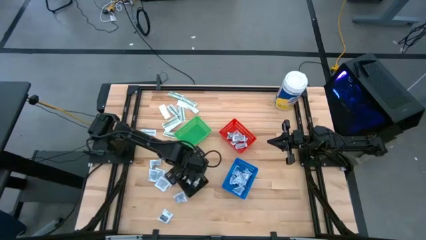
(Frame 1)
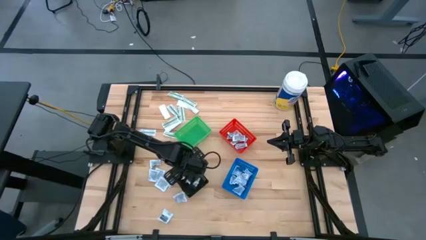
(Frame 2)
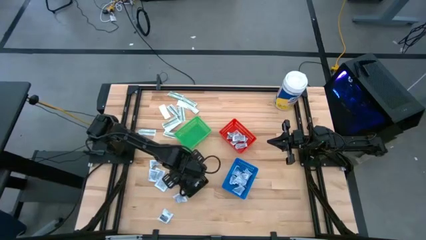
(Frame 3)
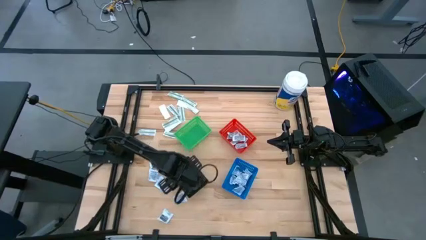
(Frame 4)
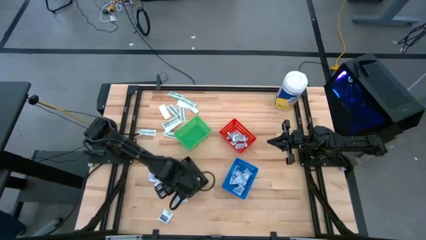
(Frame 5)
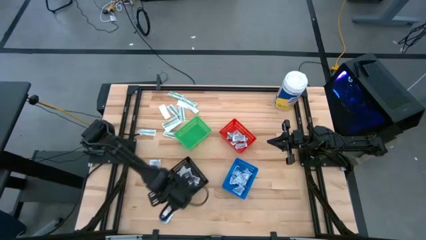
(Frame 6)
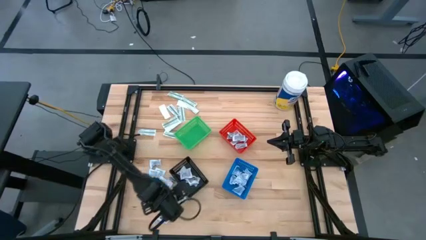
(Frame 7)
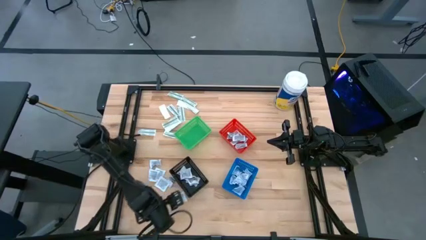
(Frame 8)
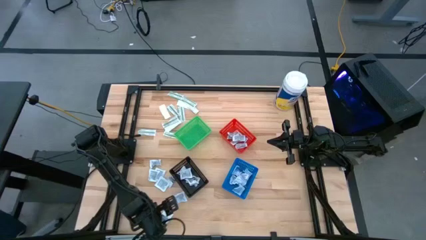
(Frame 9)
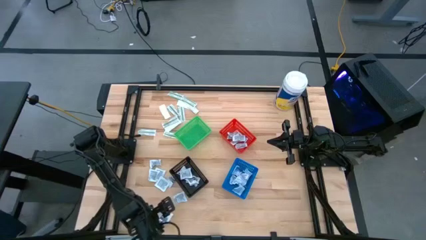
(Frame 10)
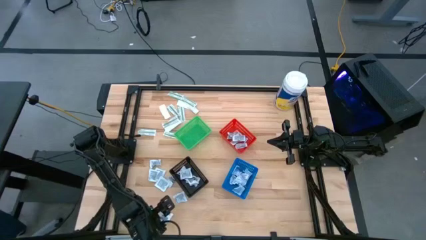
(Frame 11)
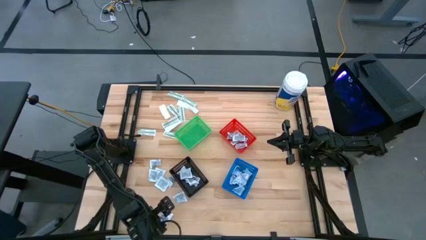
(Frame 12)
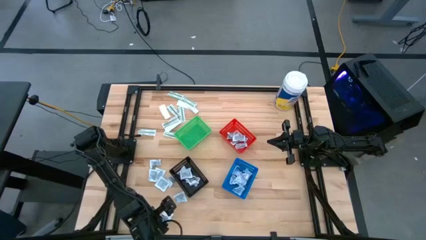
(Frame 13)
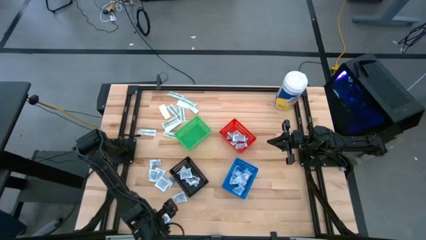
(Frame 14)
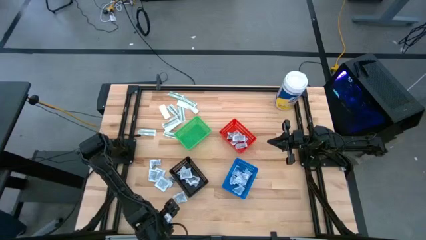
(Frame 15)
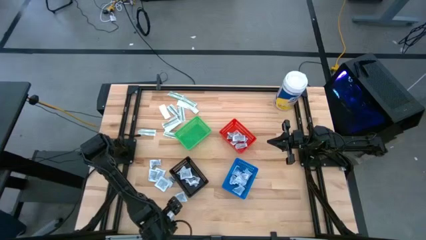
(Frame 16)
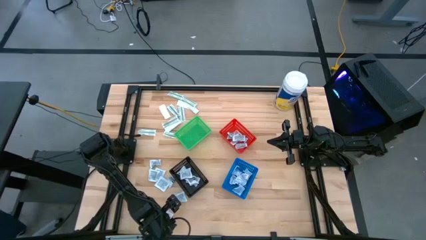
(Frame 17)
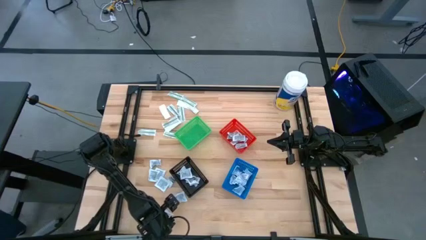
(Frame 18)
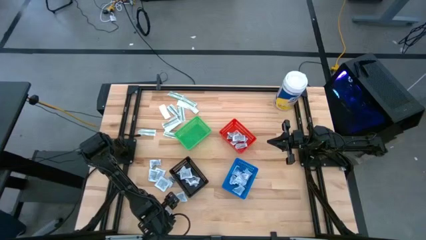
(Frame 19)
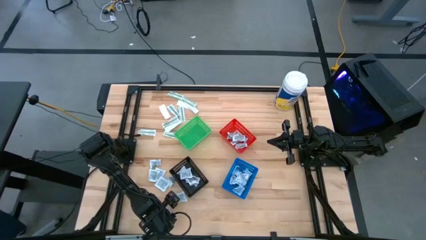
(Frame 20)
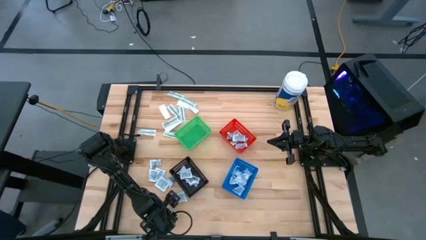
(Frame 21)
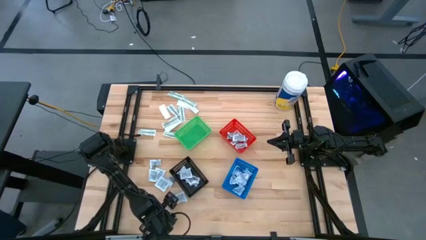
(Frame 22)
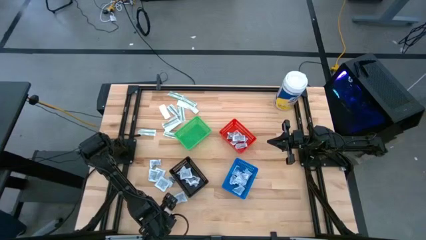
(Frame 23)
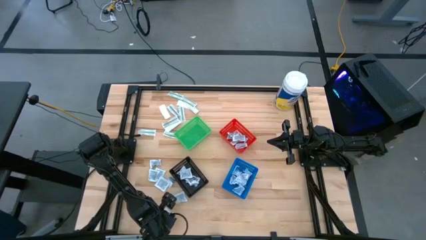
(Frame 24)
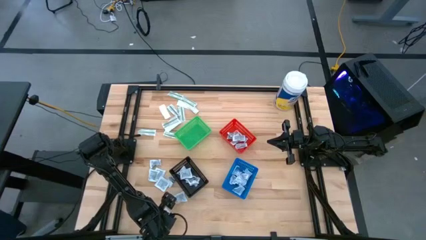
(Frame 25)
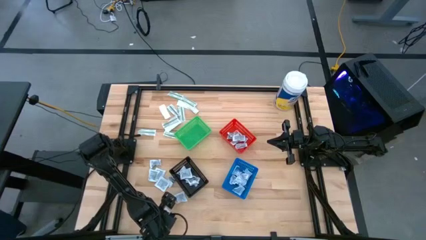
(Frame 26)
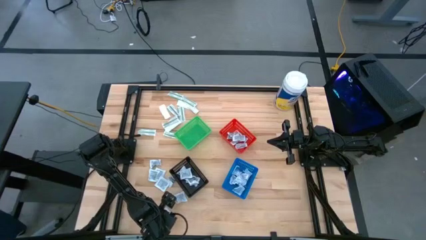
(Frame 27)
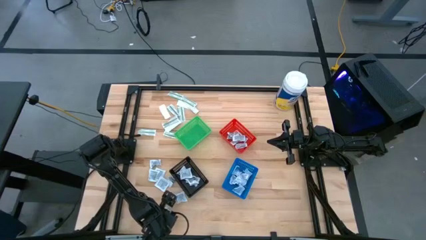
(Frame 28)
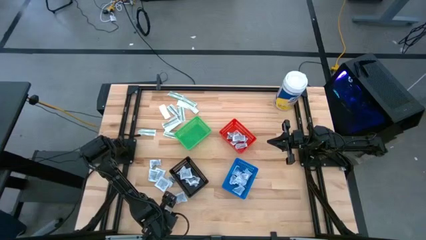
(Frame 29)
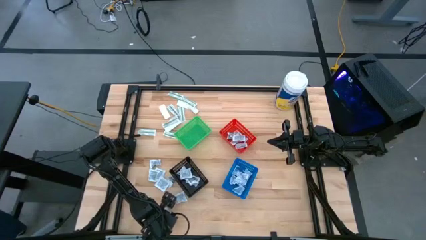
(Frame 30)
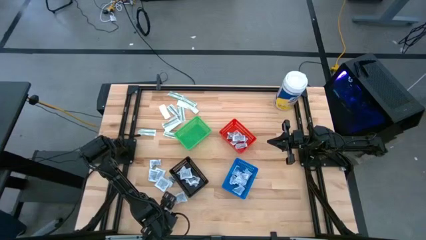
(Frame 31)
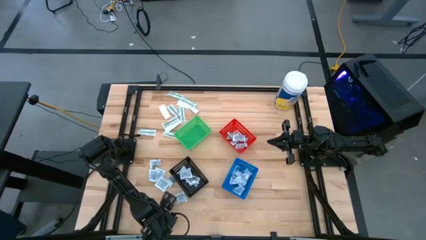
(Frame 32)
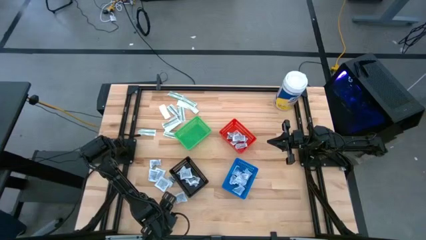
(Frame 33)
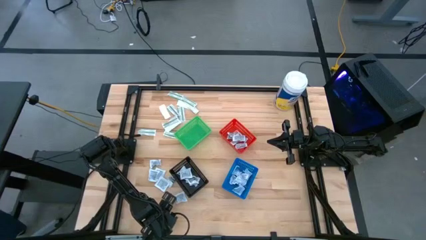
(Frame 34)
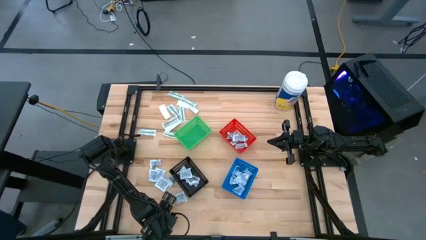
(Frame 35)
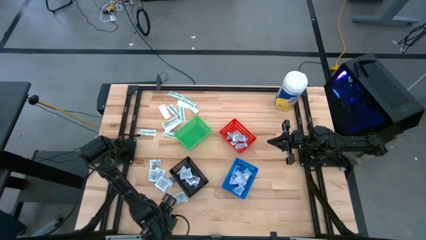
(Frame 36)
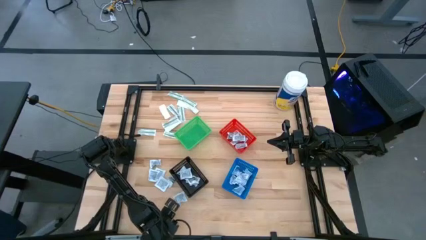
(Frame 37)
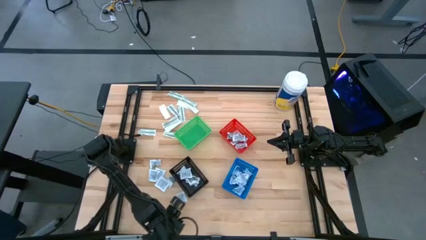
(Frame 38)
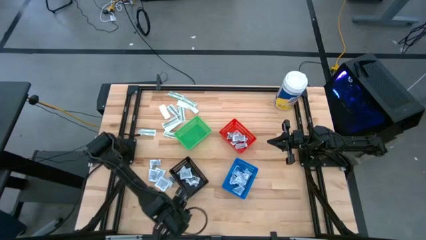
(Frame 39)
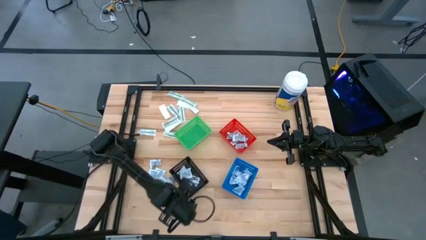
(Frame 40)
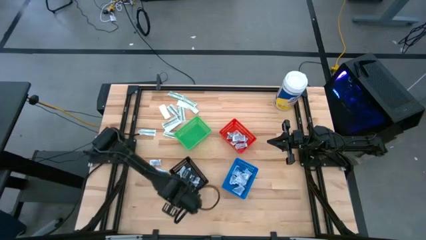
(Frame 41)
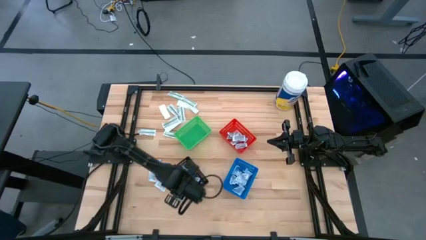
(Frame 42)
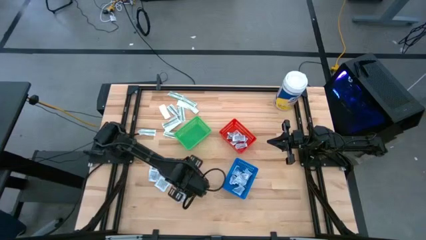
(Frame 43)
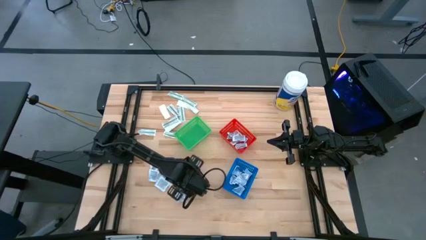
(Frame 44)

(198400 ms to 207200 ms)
Task: Pick & Place First Aid Supplies
Put the black towelette pack into the black bin

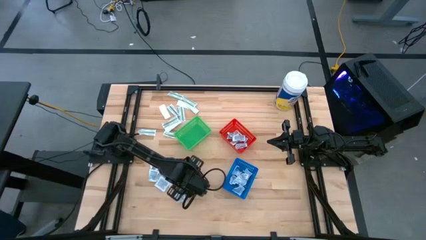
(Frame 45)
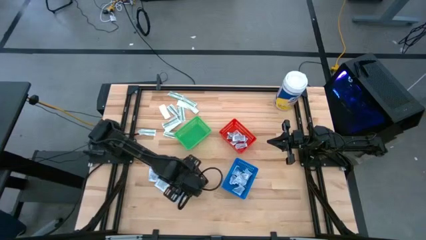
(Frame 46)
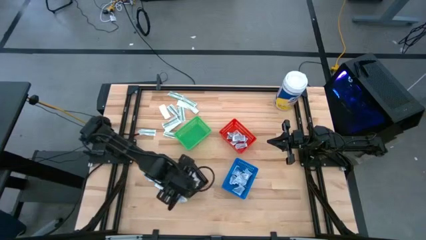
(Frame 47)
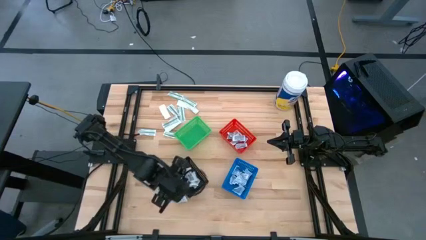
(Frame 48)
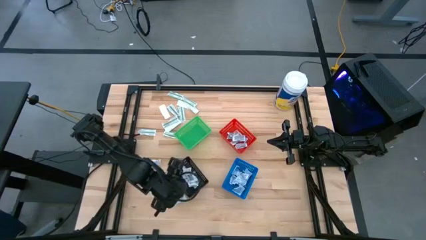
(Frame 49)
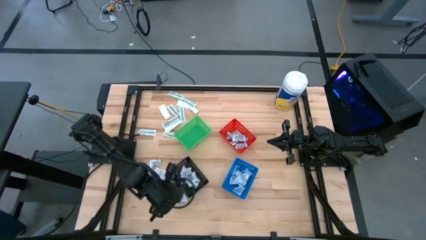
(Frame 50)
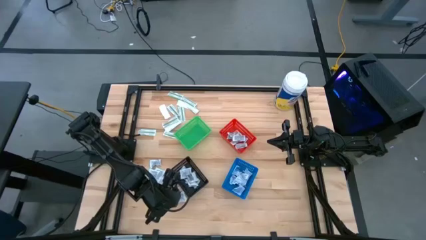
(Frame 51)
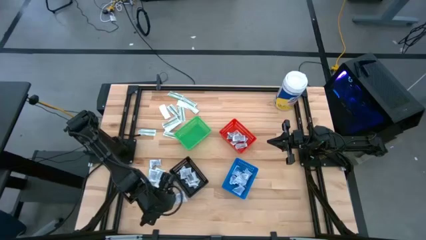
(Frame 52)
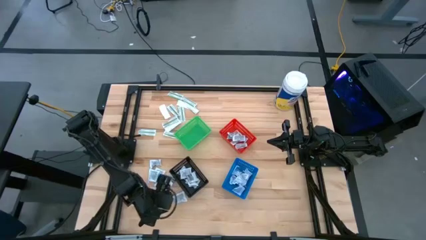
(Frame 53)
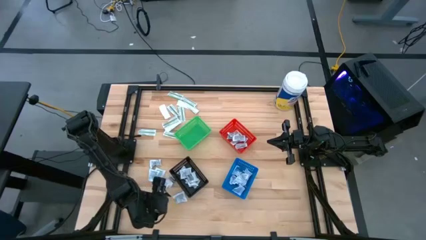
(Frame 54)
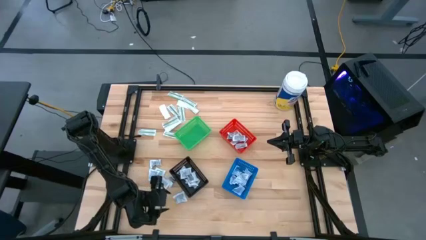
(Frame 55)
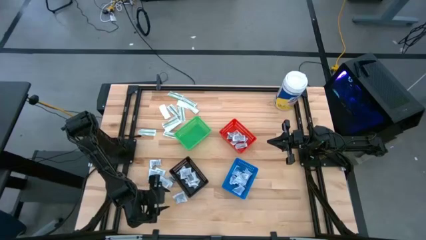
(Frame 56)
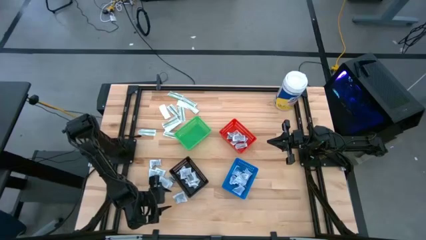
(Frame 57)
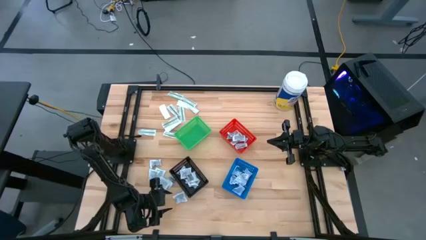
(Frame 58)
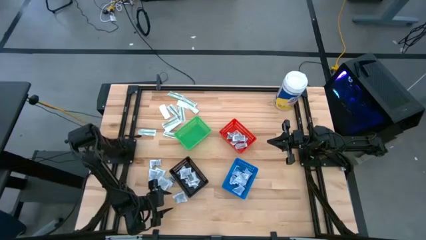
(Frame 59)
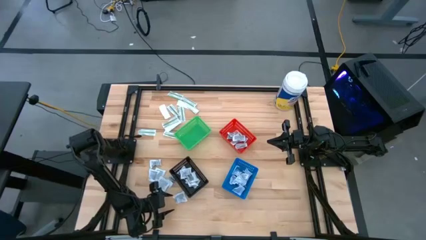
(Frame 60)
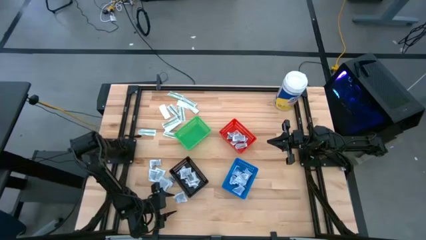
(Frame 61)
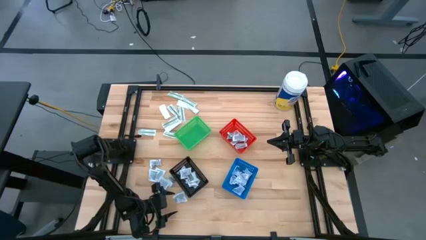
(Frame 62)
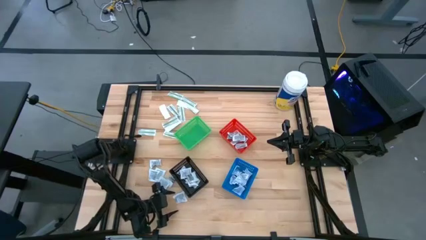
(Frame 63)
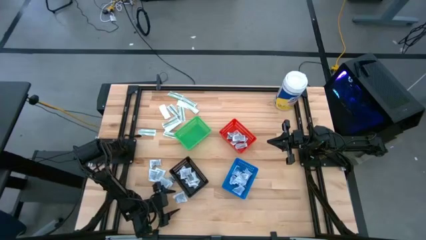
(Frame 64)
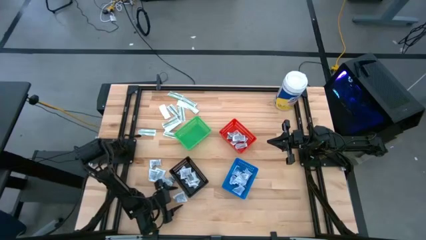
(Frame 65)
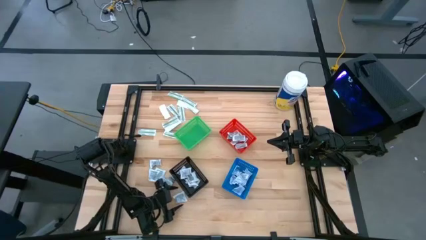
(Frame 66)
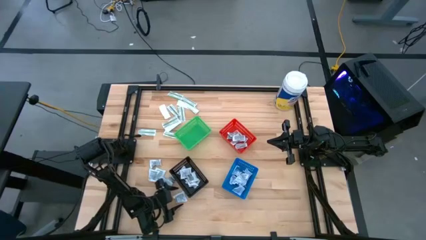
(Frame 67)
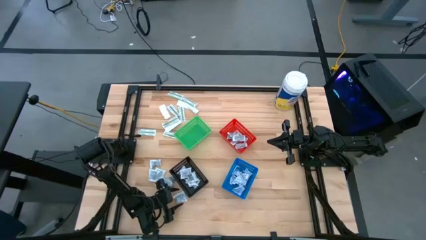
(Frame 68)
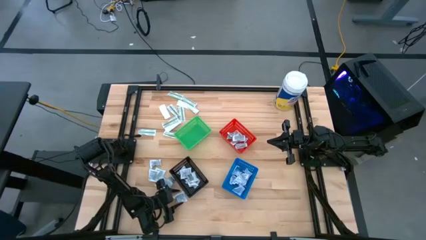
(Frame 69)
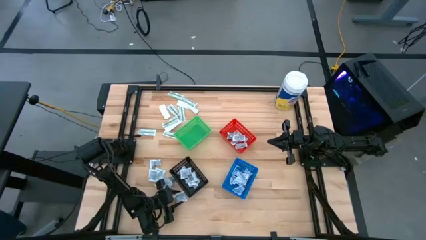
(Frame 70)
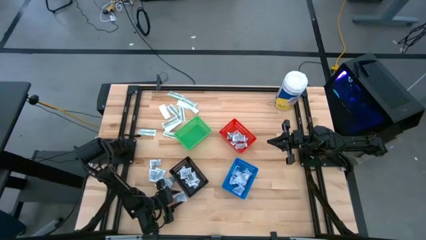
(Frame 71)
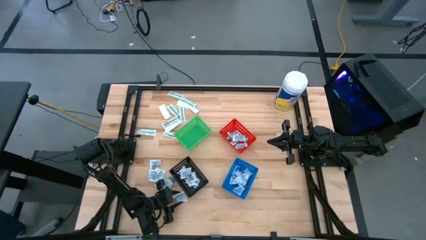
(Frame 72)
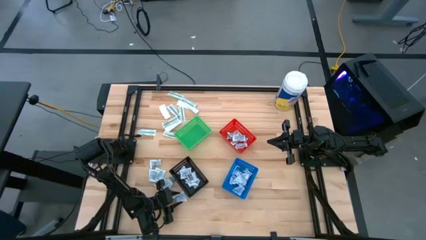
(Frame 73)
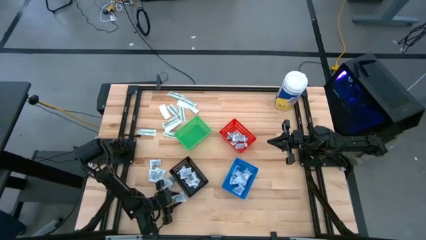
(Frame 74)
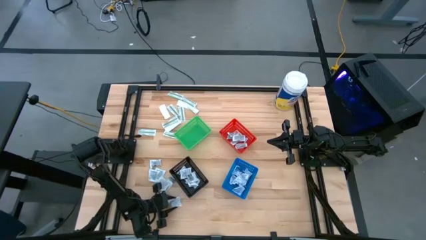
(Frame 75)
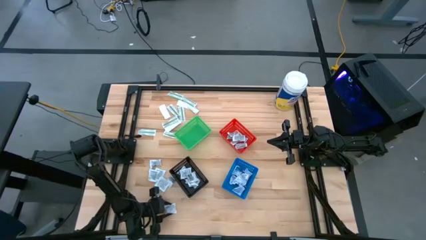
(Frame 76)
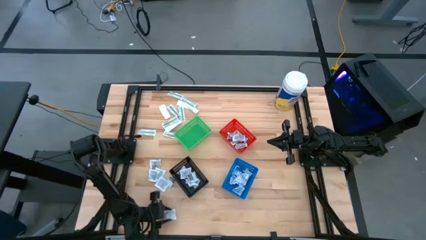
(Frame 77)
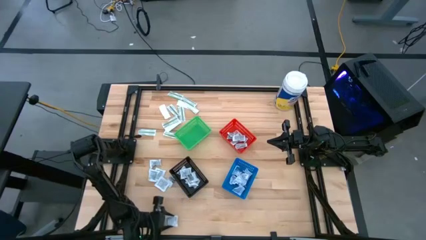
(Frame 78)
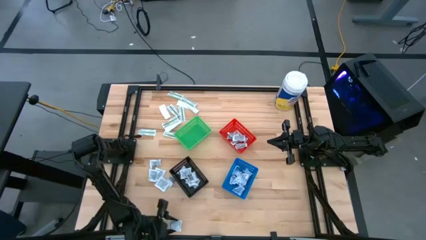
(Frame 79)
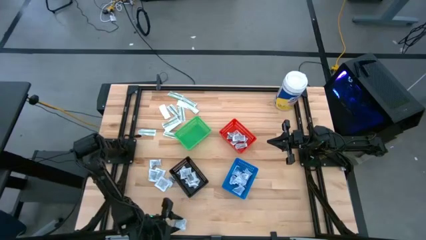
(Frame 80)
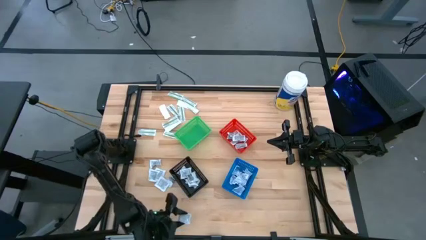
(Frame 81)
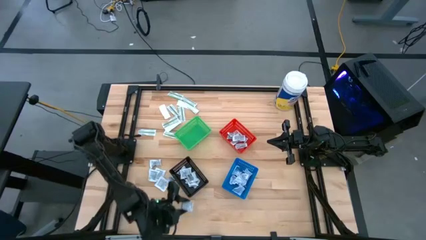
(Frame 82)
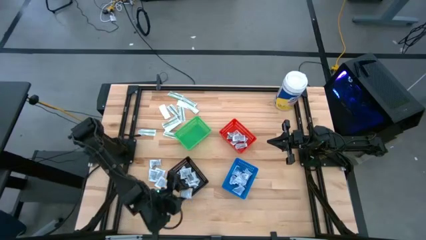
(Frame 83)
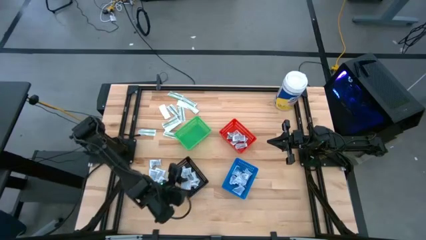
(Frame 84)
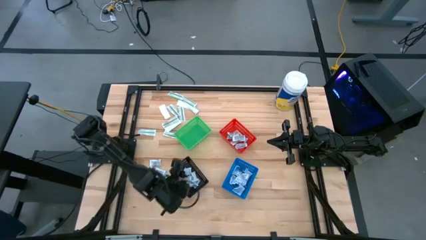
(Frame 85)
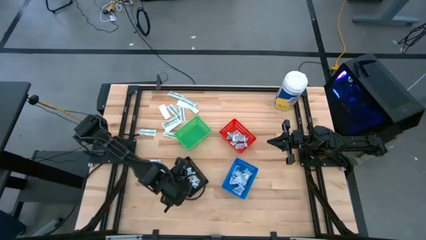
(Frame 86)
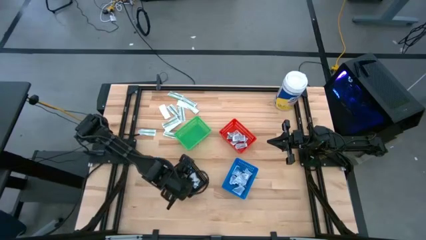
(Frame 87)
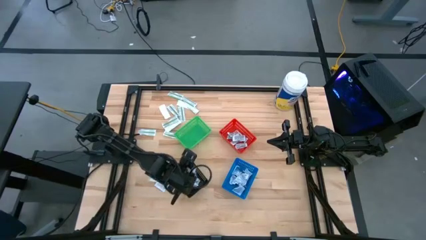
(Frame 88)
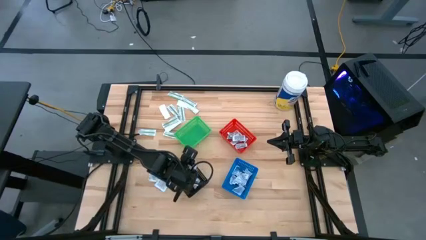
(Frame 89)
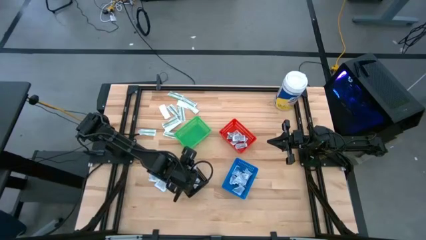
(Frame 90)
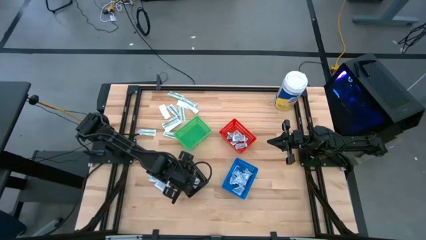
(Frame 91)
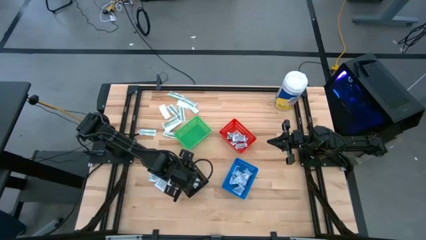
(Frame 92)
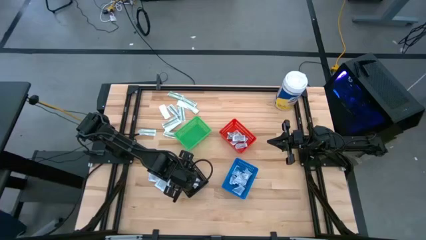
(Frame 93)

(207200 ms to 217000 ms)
Put the black towelette pack into the black bin
